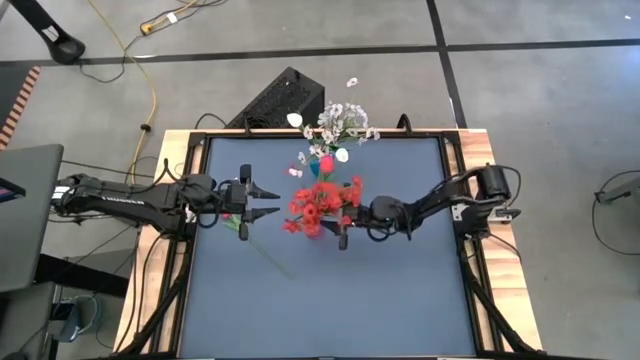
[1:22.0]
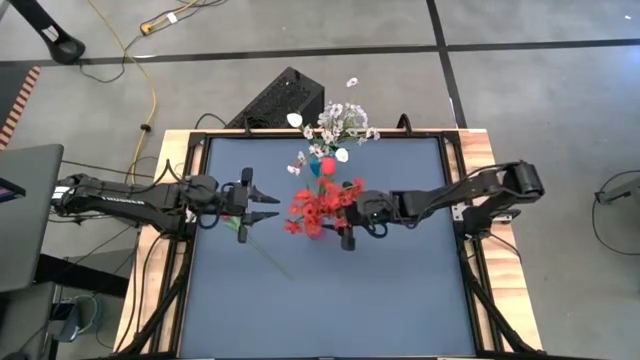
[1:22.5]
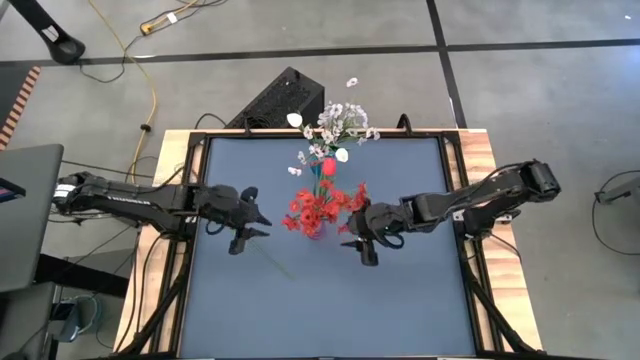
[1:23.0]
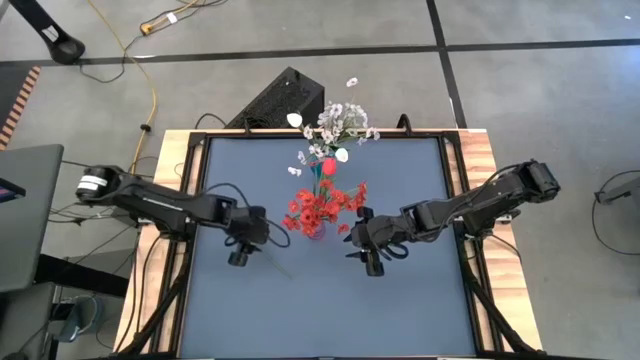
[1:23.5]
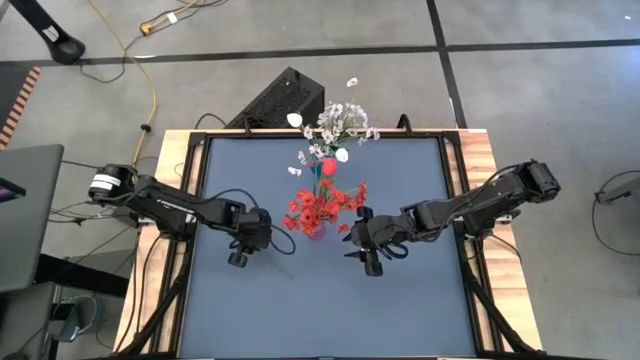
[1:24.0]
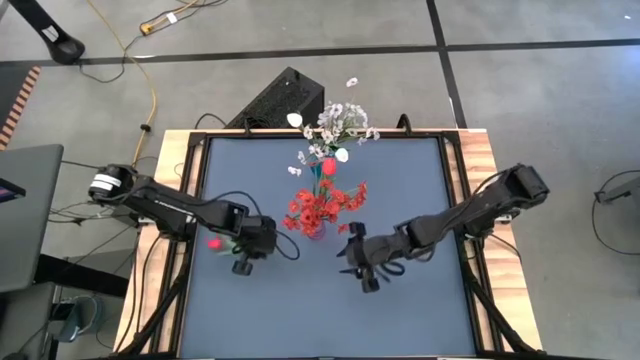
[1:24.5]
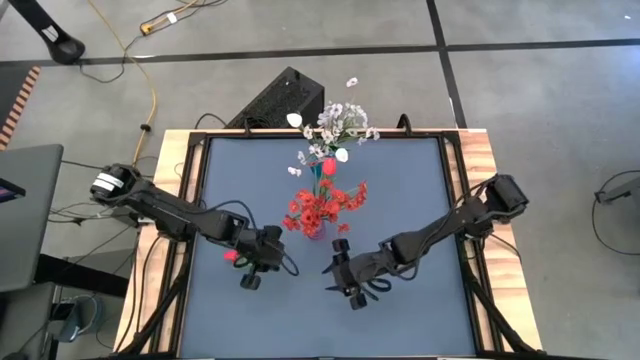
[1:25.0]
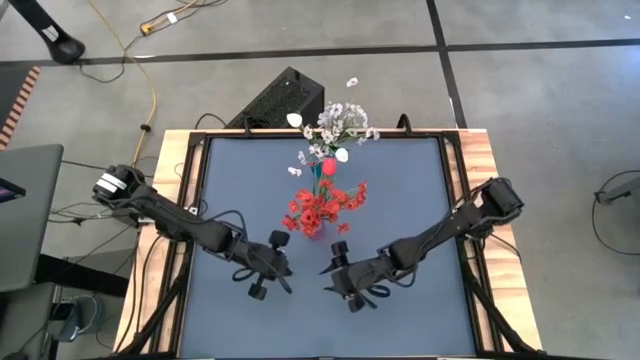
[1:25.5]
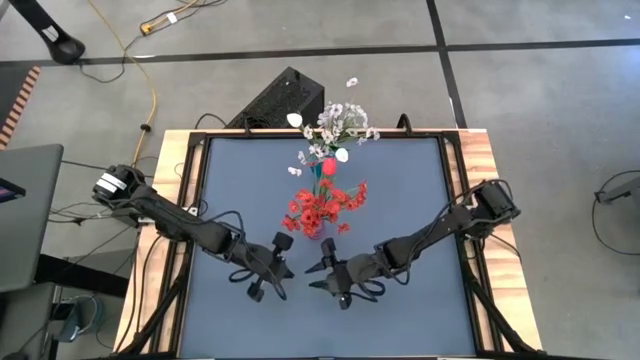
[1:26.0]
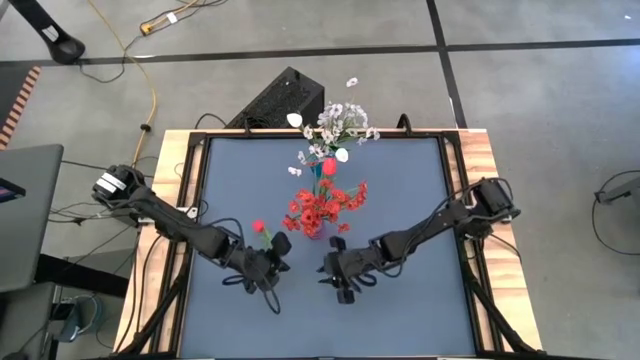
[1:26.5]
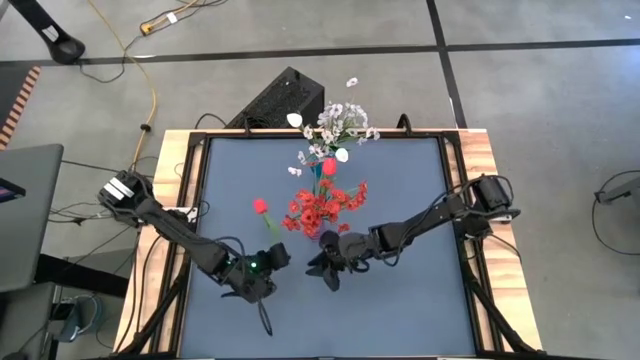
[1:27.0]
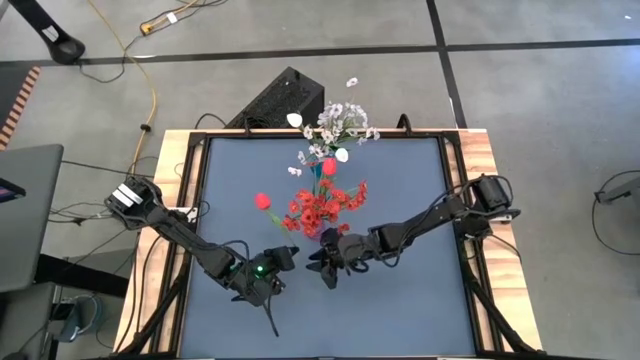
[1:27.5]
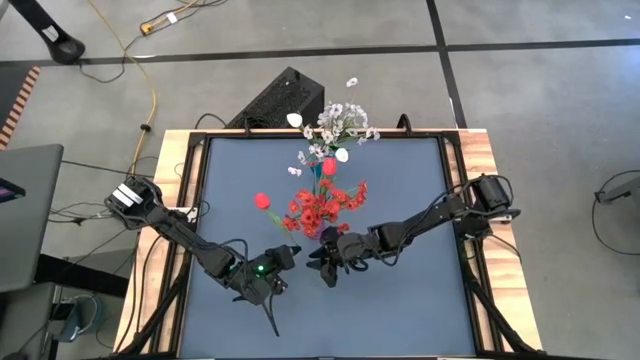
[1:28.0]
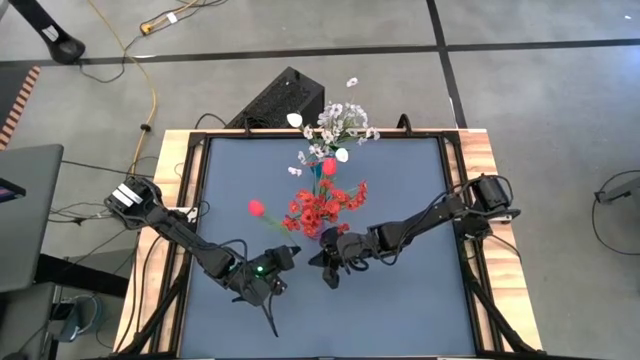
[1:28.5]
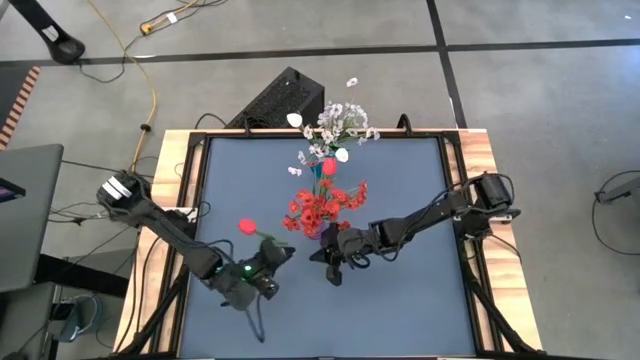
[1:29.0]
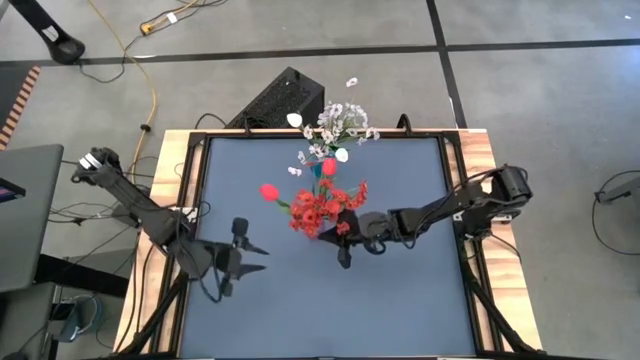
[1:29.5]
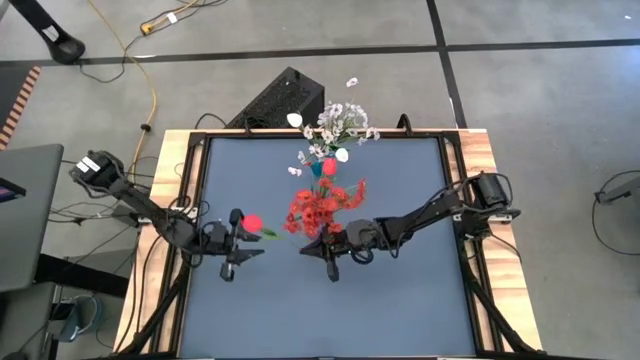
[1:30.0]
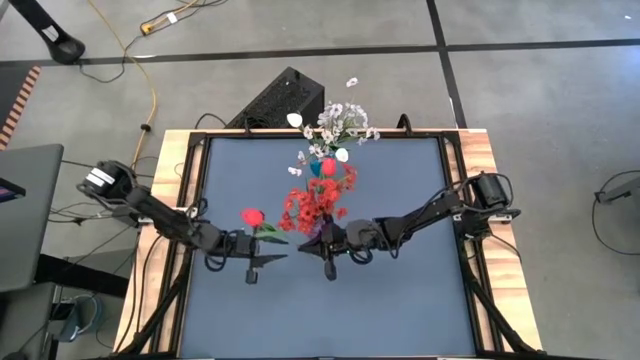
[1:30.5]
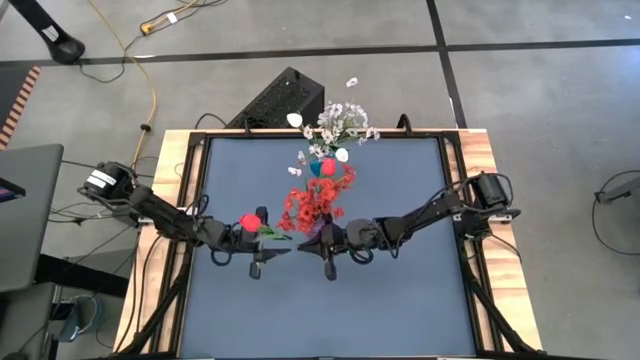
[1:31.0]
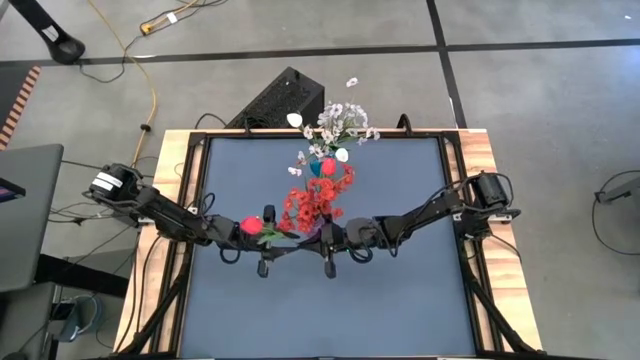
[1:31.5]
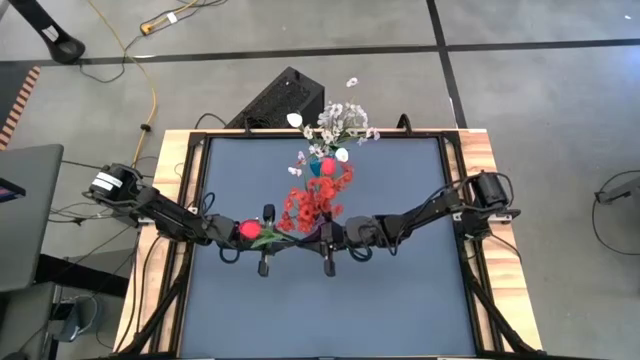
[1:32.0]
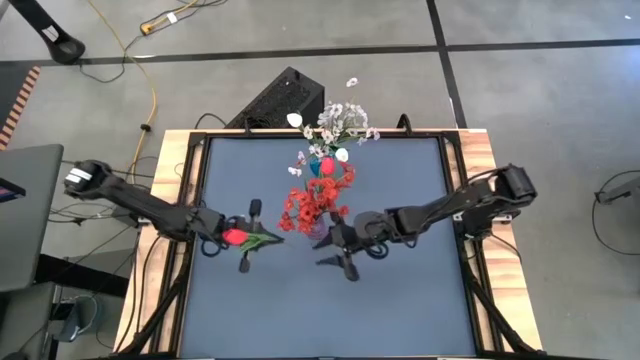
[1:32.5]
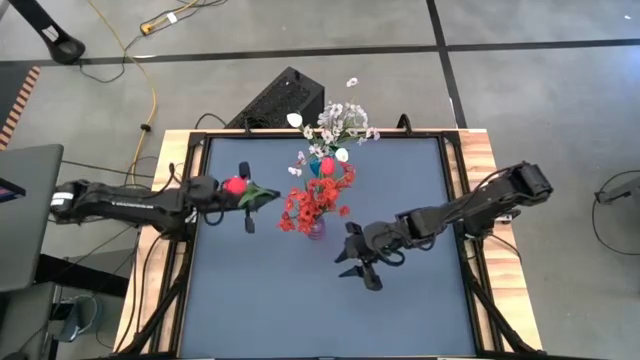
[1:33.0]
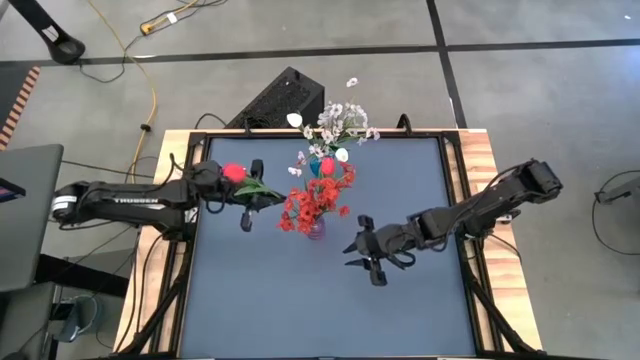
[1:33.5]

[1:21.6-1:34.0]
Task: Sort flowers into vase by color
Put the red tulip into the purple vase

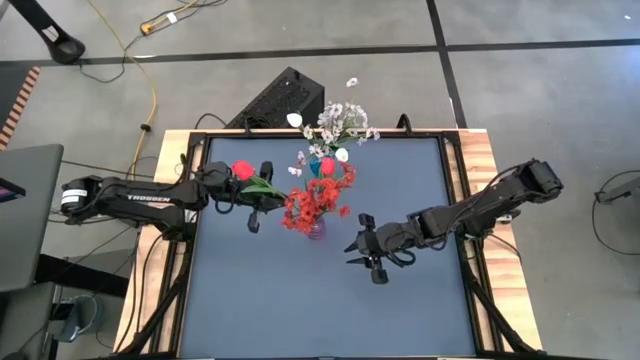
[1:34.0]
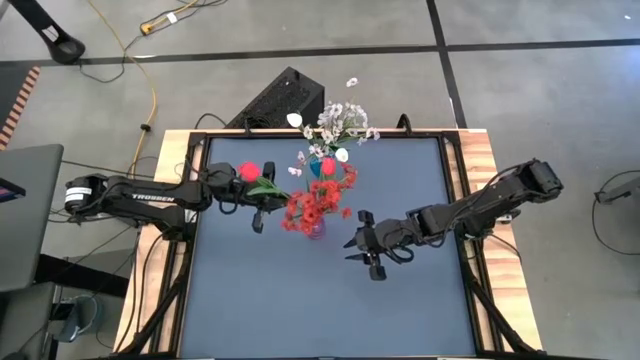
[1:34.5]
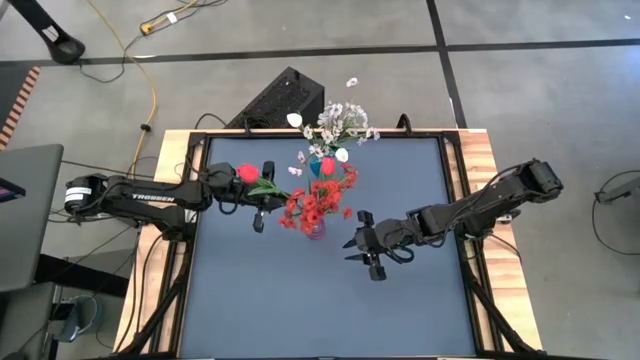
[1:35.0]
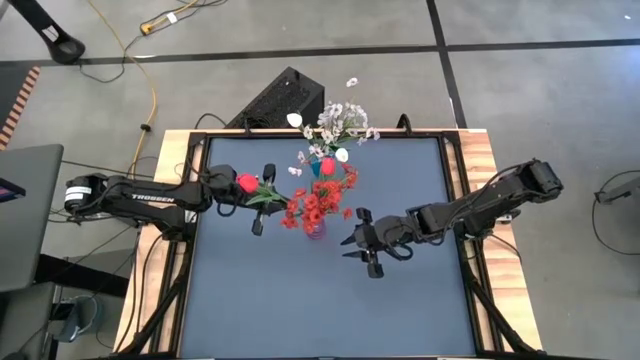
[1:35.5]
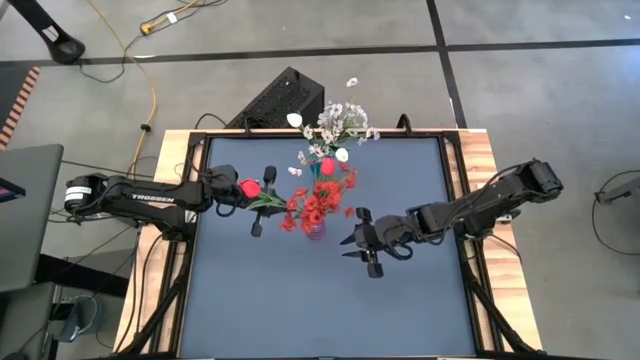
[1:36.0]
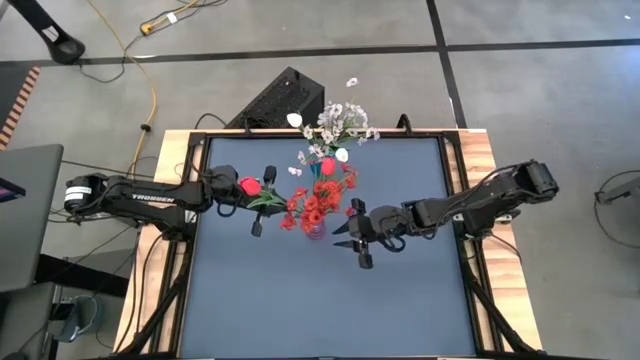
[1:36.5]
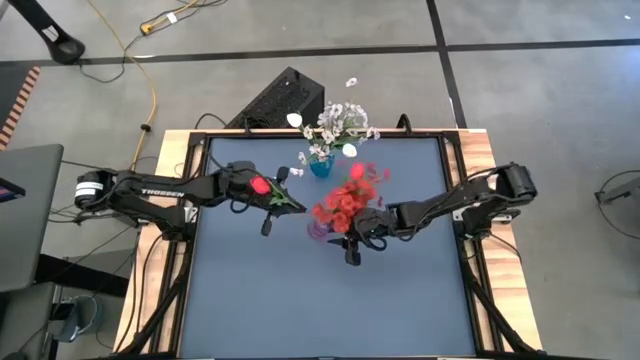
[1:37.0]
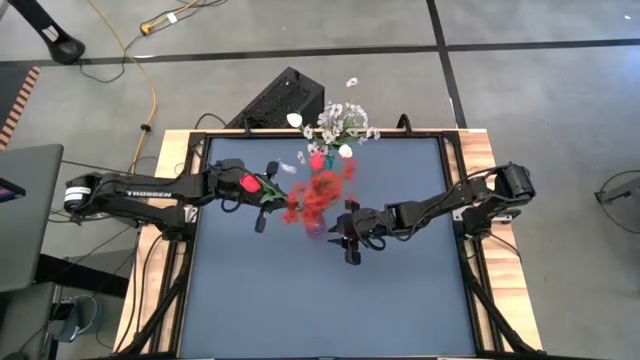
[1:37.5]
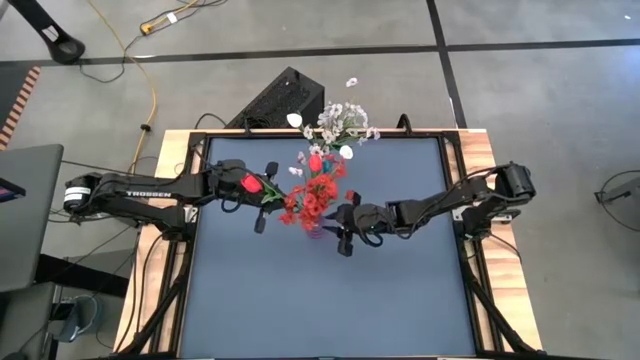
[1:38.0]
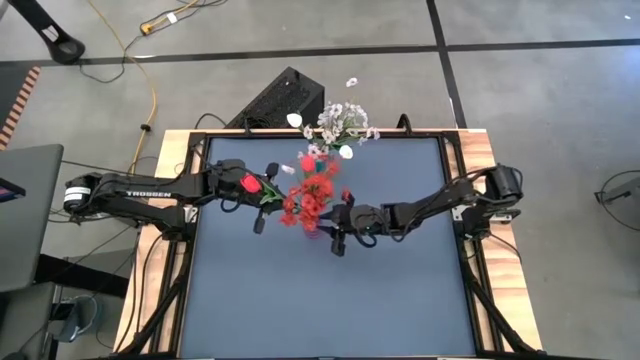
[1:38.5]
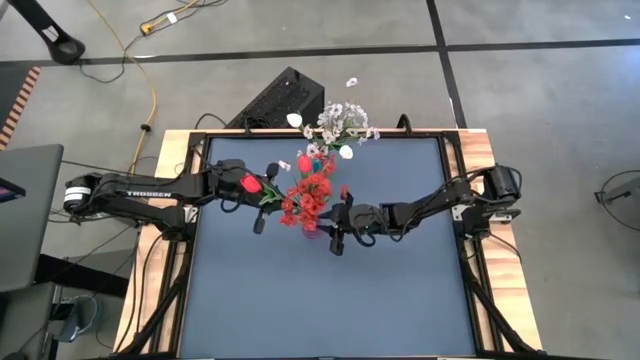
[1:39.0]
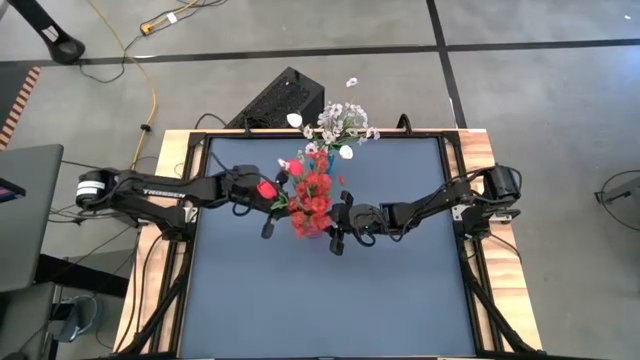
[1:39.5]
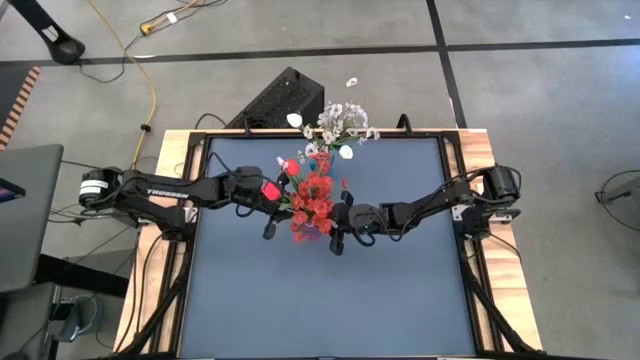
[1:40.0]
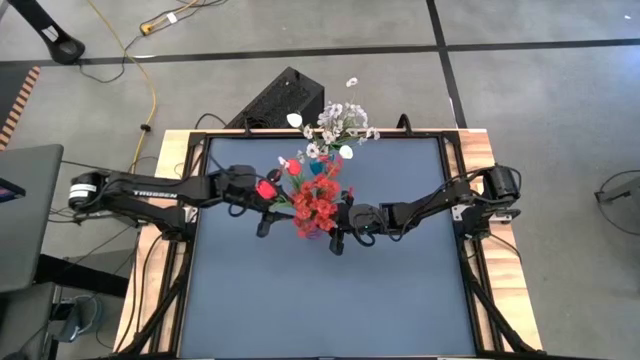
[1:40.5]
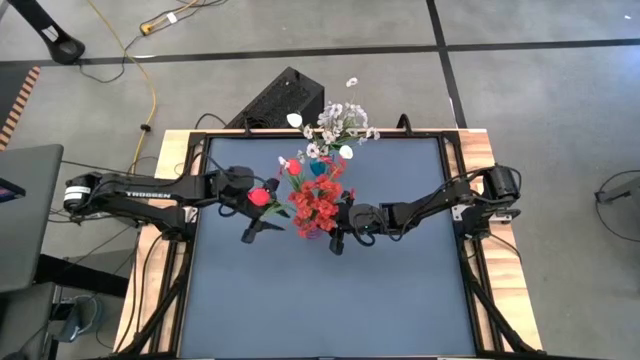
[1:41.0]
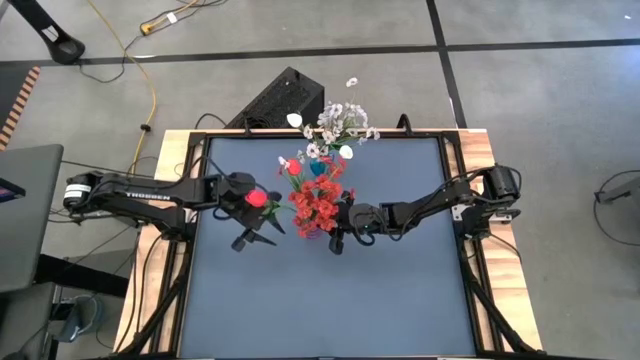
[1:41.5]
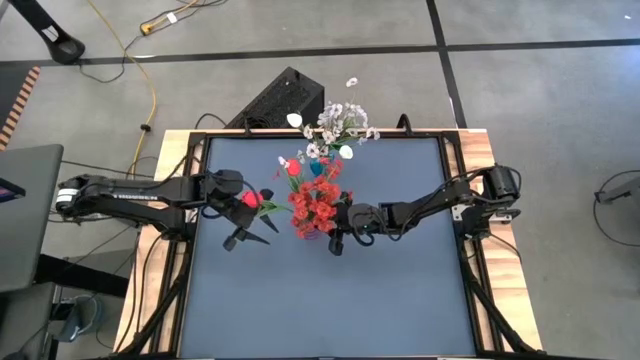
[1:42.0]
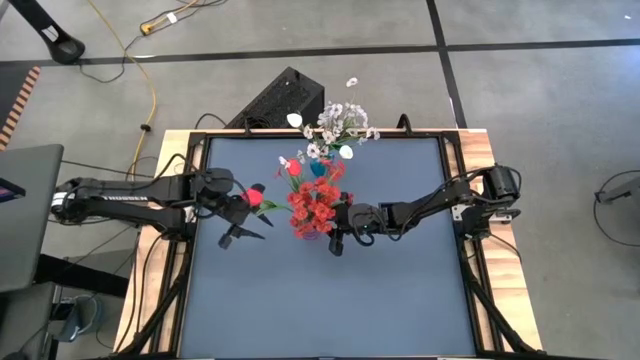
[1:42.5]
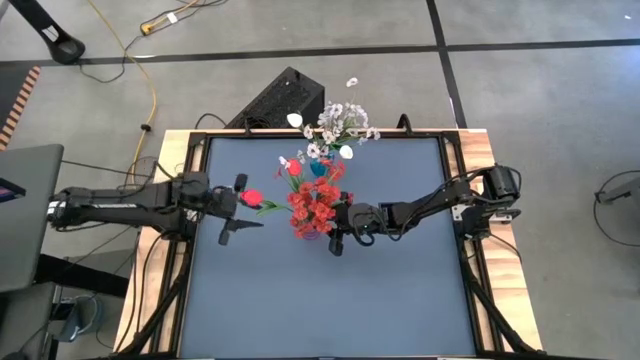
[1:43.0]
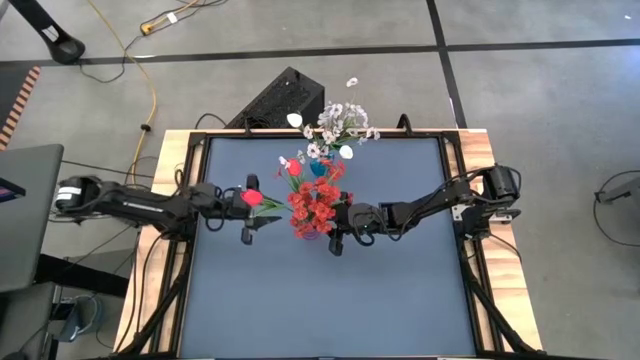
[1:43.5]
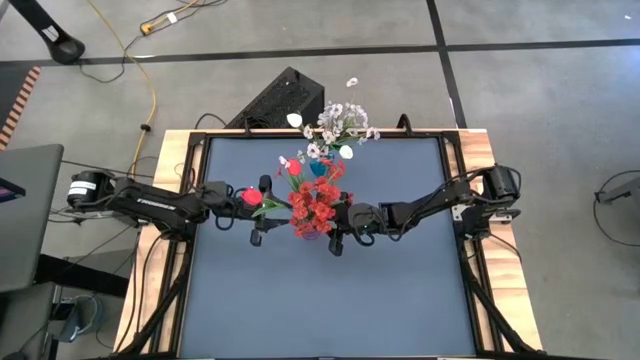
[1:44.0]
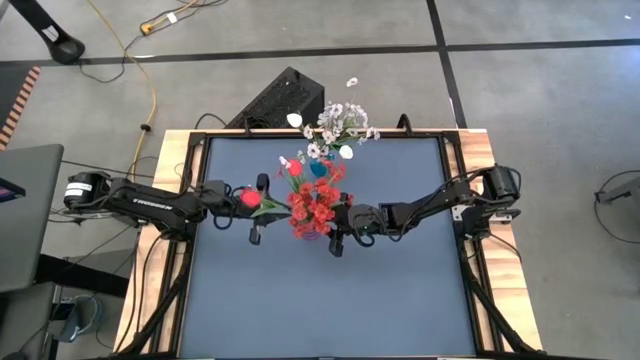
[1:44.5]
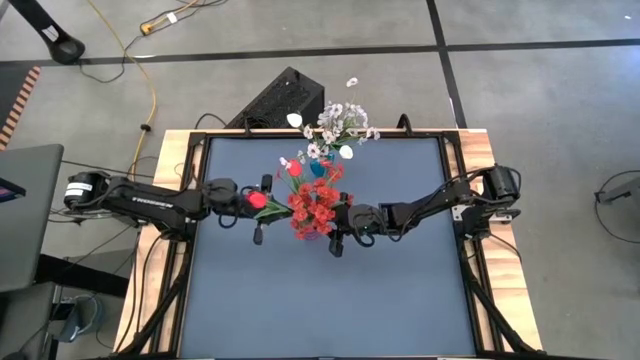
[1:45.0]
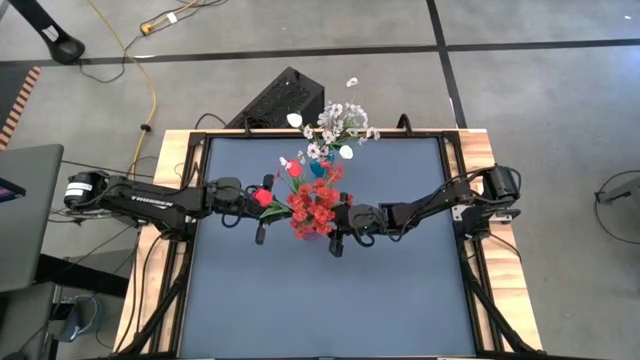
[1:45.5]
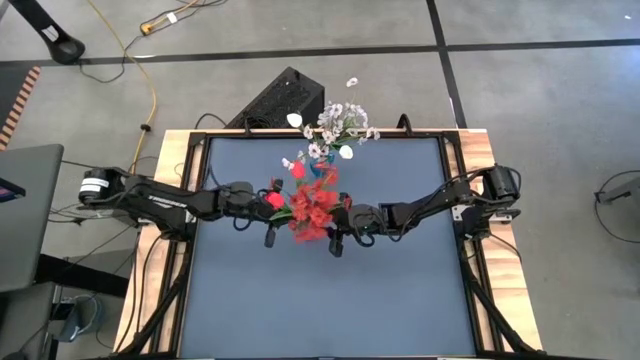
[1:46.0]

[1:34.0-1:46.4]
Put the red tulip into the purple vase
